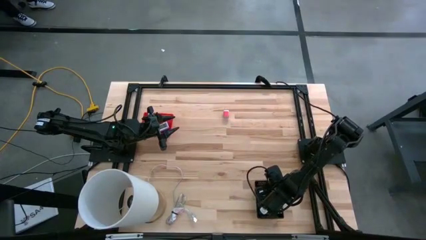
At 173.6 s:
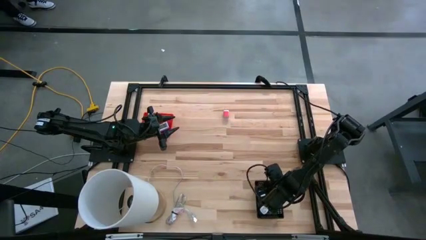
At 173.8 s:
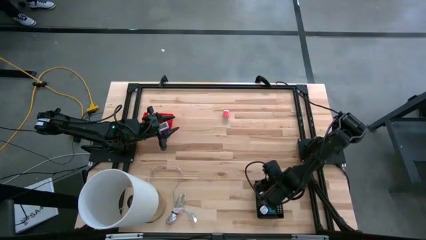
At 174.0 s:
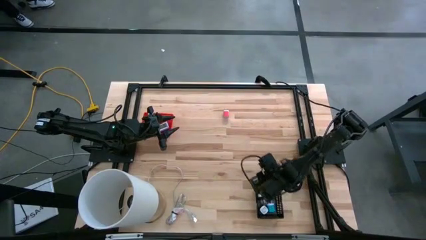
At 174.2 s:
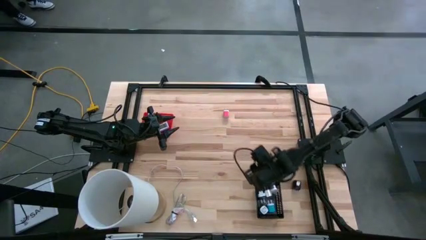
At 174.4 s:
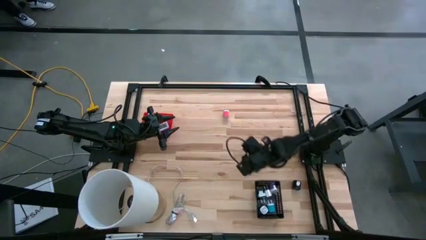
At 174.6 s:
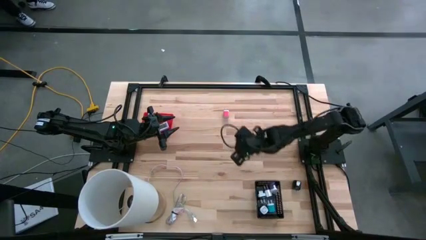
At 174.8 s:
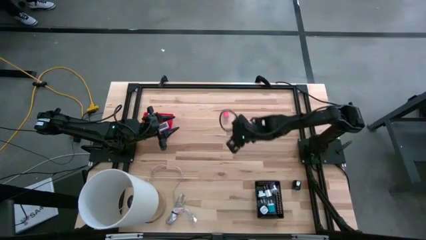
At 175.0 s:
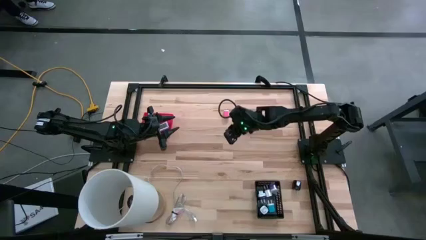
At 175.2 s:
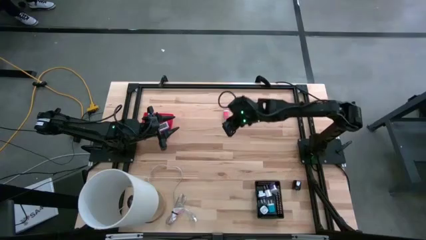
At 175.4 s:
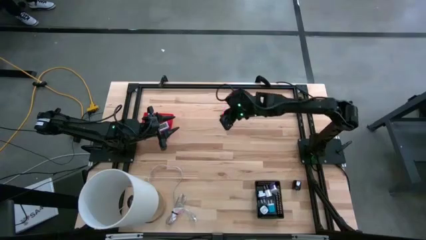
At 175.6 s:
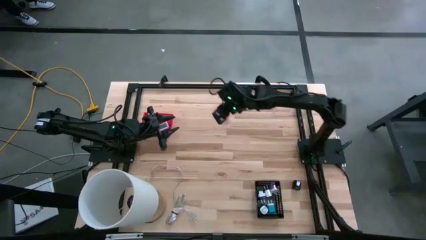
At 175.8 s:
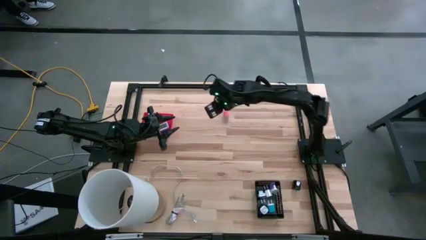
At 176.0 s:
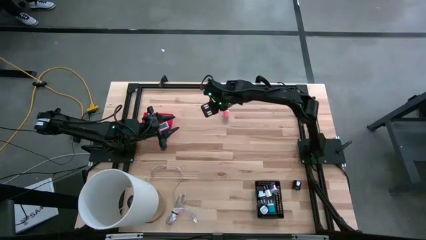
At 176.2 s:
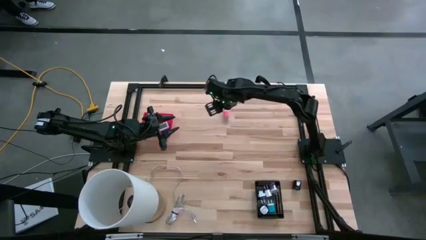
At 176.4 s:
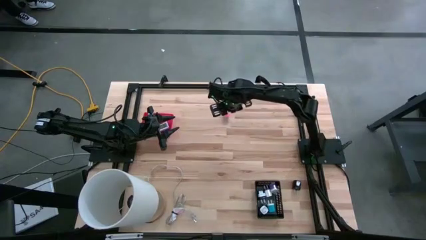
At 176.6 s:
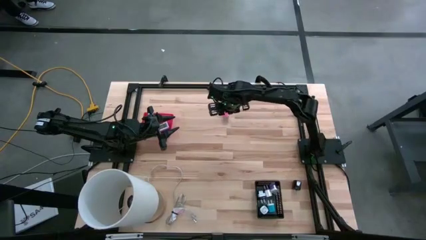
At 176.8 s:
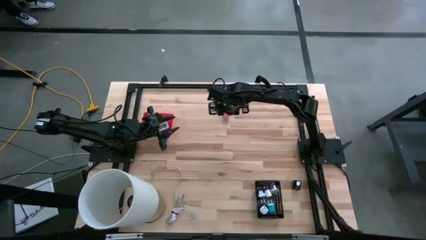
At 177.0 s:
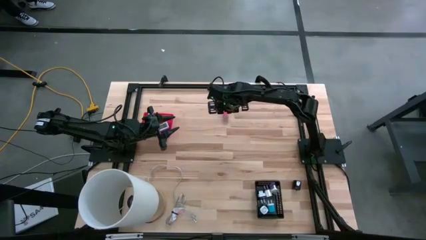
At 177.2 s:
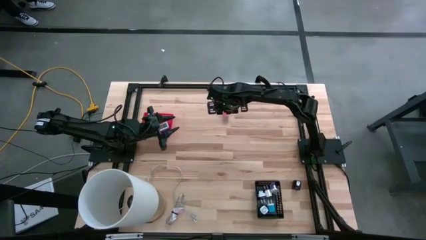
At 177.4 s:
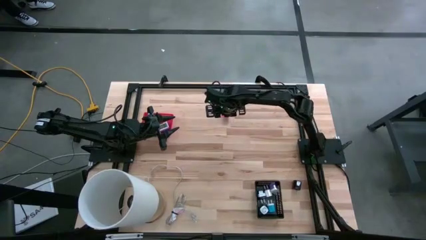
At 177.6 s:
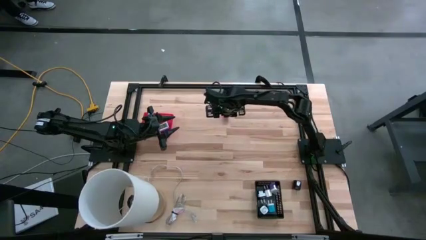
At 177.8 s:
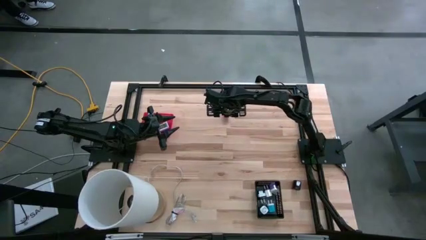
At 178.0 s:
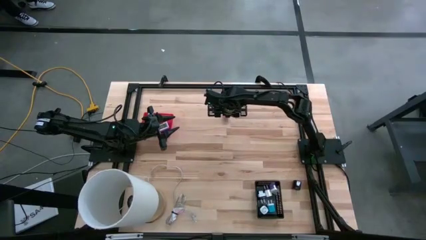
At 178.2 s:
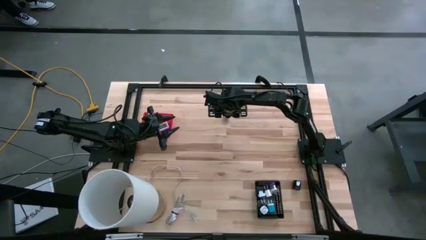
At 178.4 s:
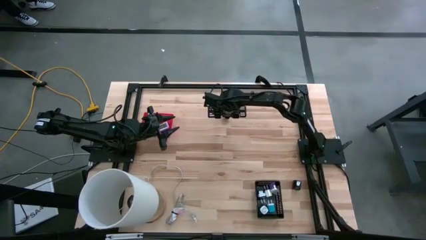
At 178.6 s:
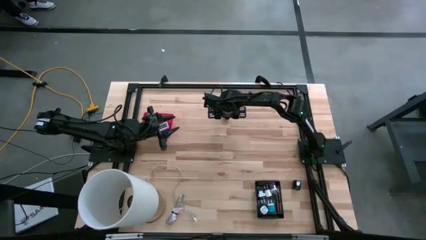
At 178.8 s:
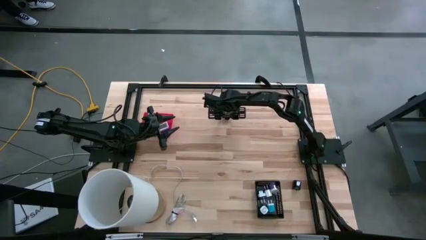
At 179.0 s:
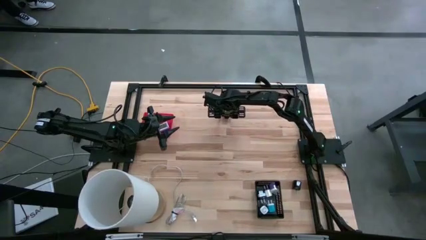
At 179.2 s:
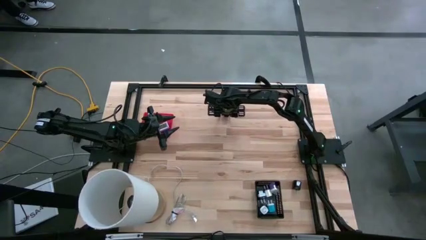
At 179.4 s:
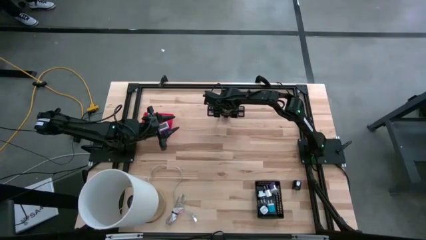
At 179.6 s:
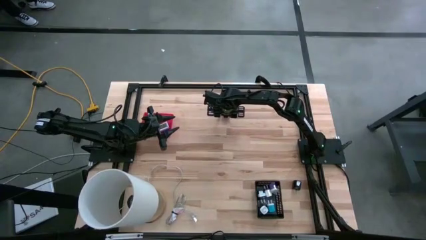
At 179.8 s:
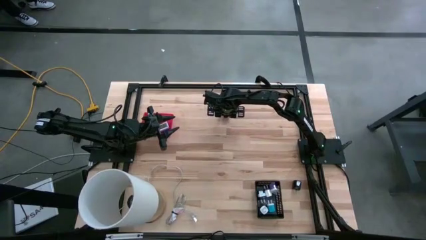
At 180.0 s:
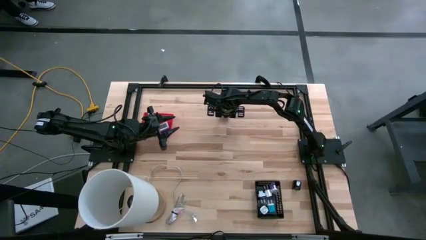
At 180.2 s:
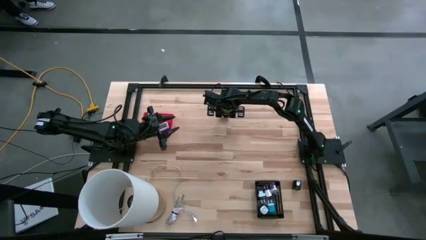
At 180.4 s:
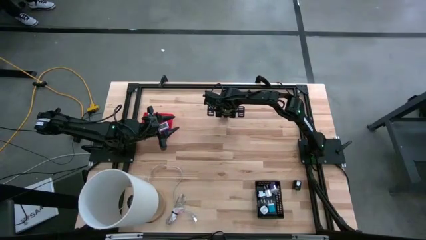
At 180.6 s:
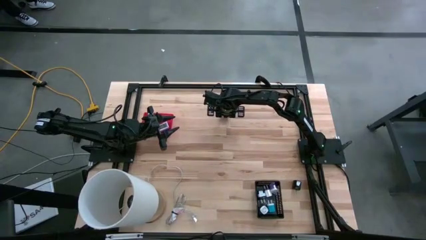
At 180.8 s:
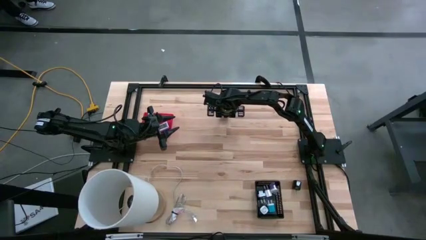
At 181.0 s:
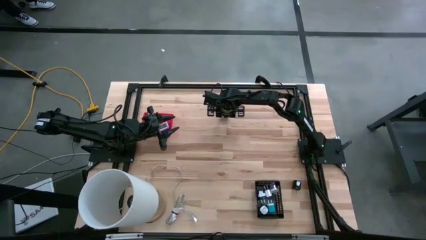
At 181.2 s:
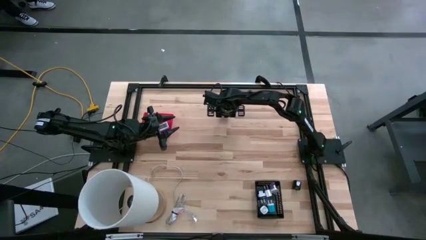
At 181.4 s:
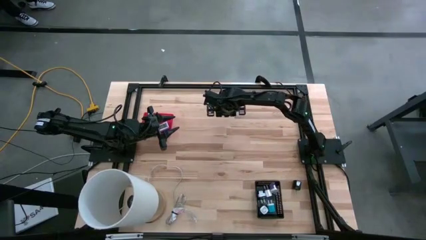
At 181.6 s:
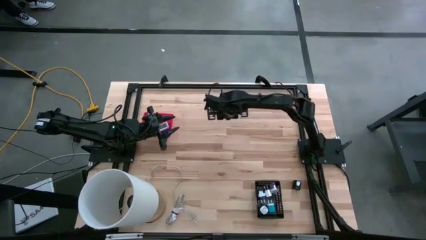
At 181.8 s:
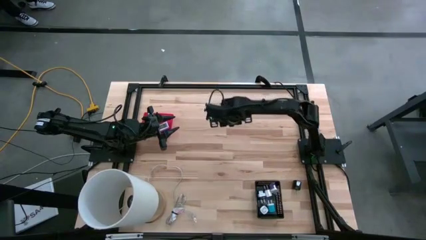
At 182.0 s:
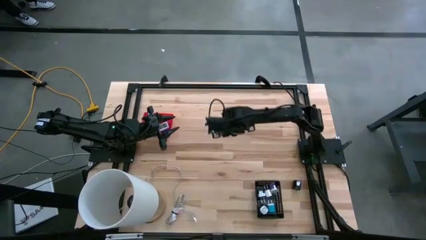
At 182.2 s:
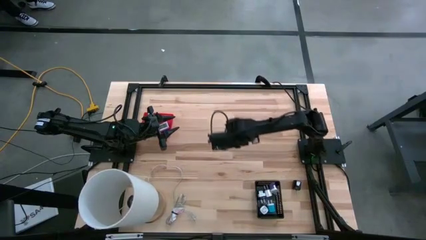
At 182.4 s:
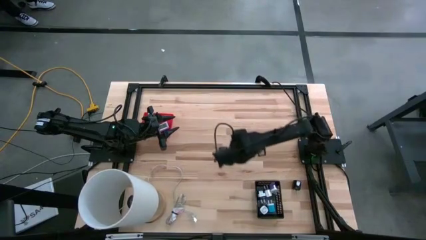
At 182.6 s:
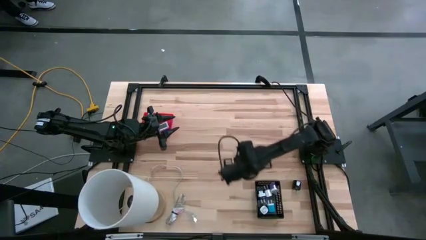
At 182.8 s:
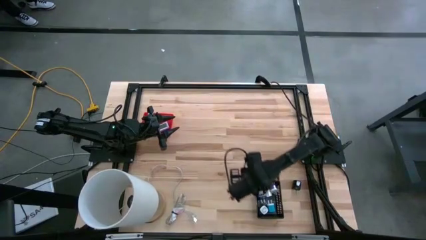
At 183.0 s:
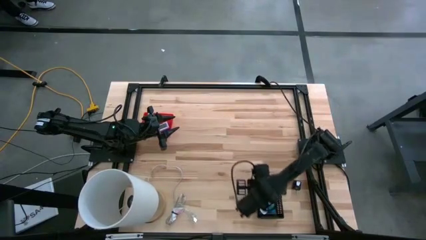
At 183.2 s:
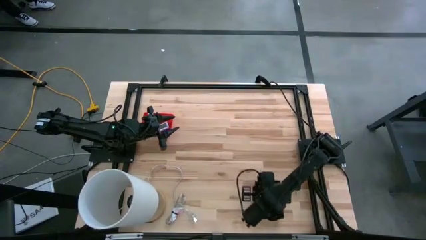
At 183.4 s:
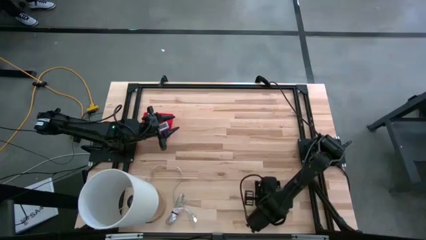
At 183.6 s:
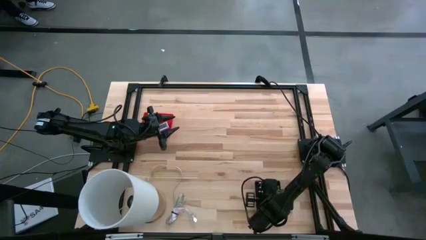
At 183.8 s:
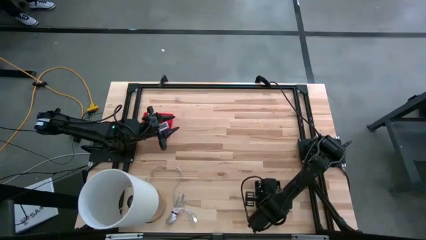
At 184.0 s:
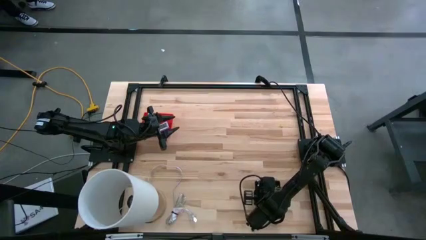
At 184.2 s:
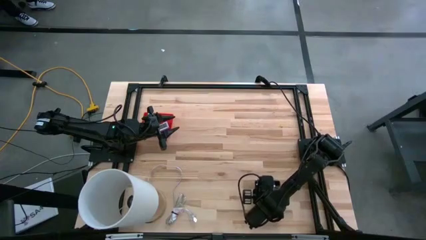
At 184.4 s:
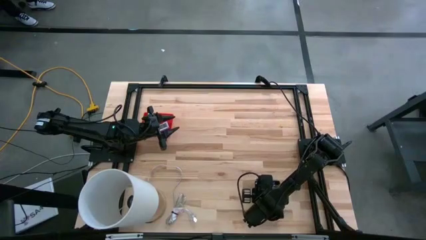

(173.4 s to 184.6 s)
Task: Pick & Place Office items
Put the pink charger adapter into the black bin
